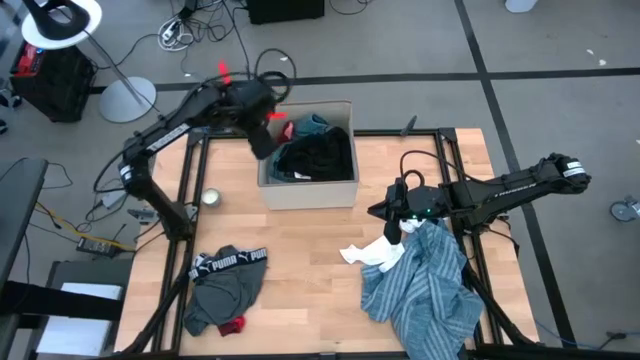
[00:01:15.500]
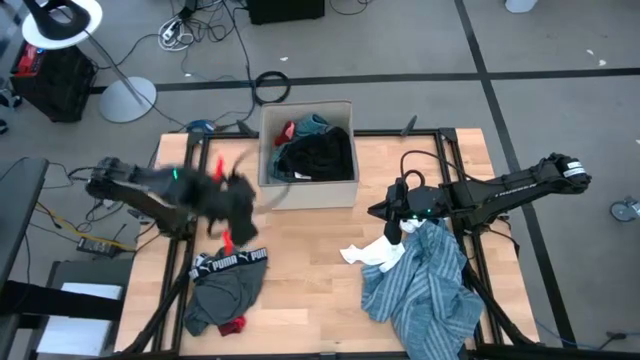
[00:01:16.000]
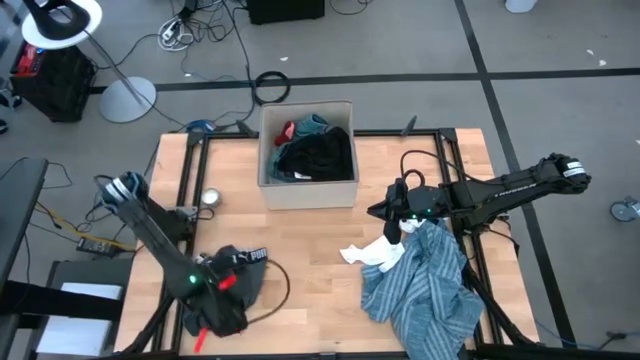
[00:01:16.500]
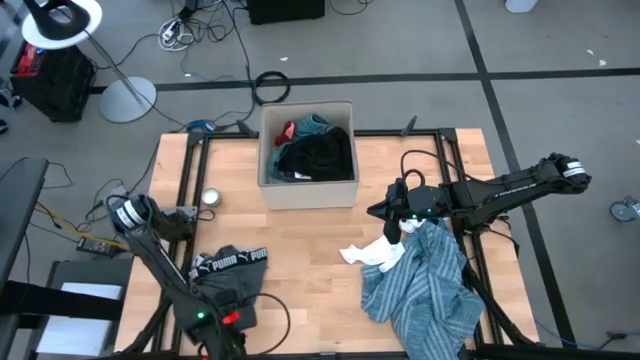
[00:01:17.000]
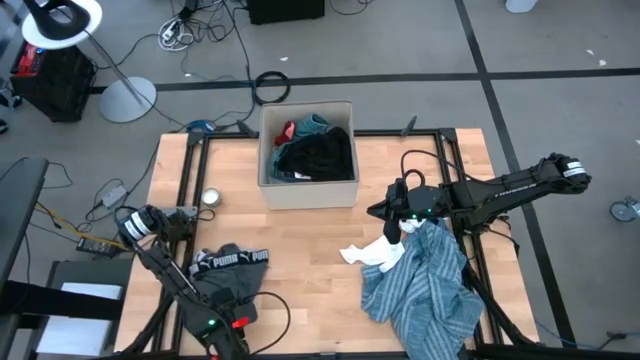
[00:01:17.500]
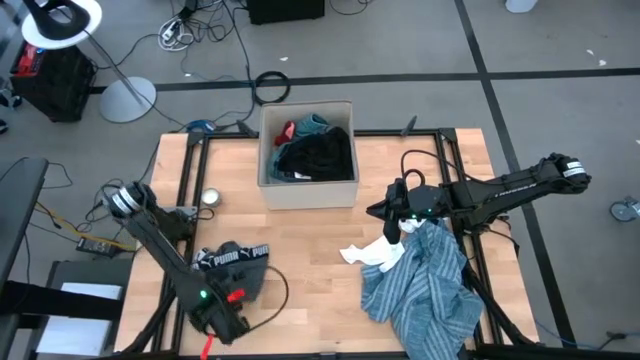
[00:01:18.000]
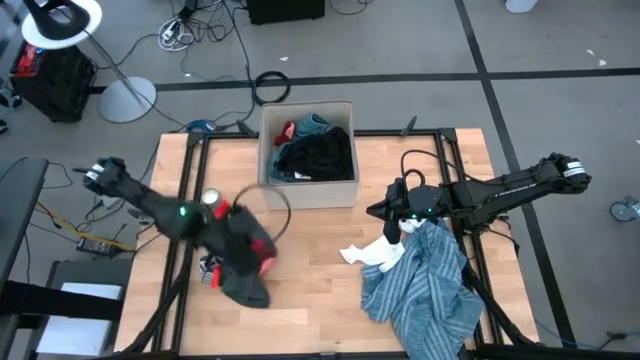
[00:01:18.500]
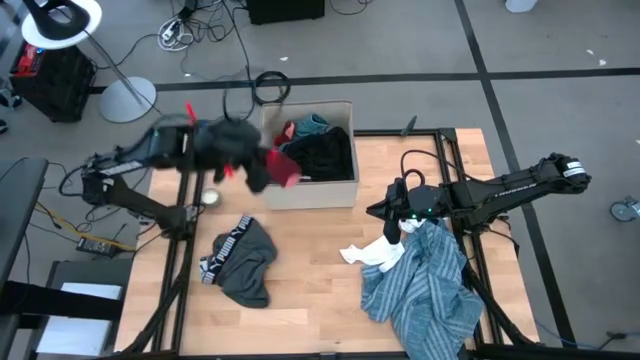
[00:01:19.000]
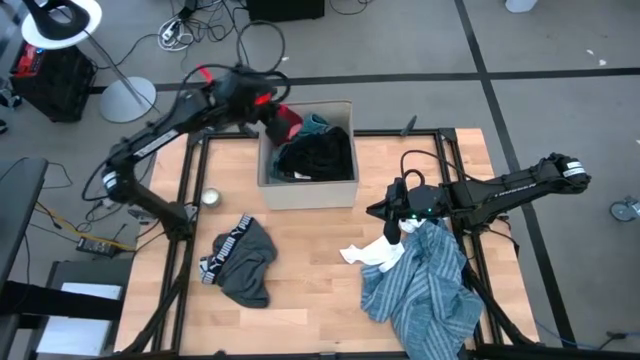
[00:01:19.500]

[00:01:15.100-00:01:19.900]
Task: Sort clothes
Put the red sock into the laundry organizer

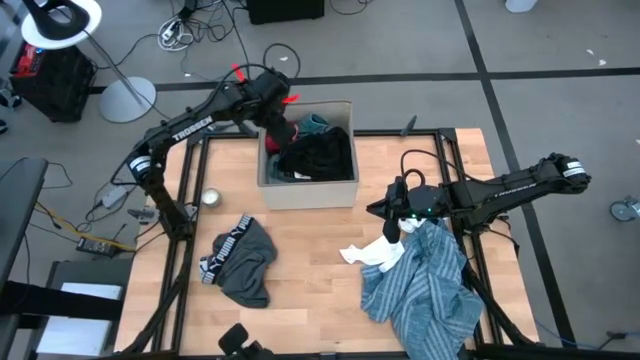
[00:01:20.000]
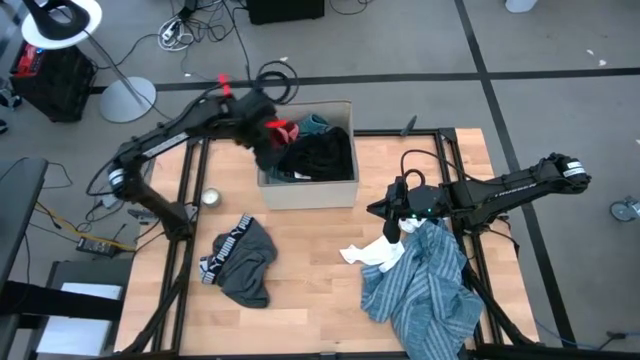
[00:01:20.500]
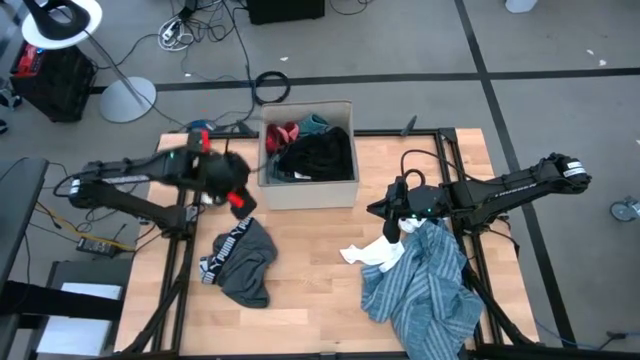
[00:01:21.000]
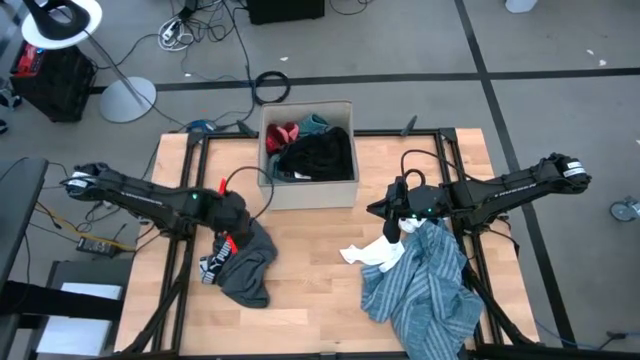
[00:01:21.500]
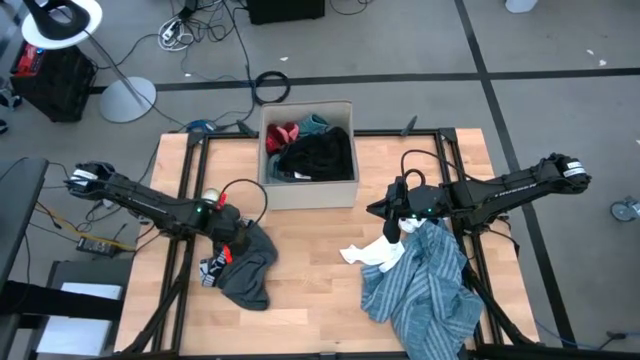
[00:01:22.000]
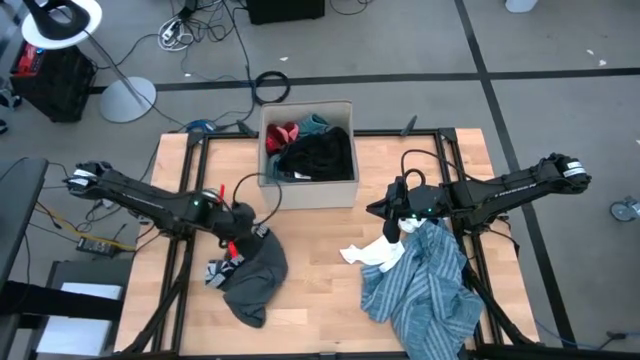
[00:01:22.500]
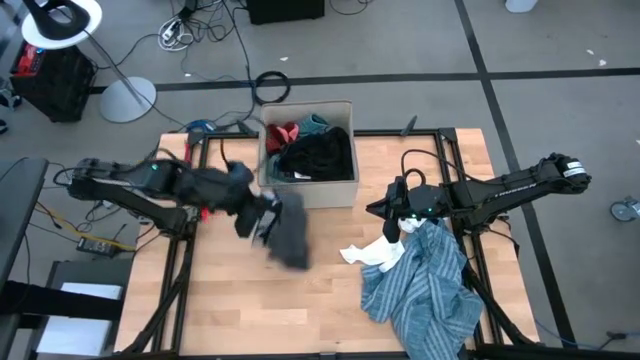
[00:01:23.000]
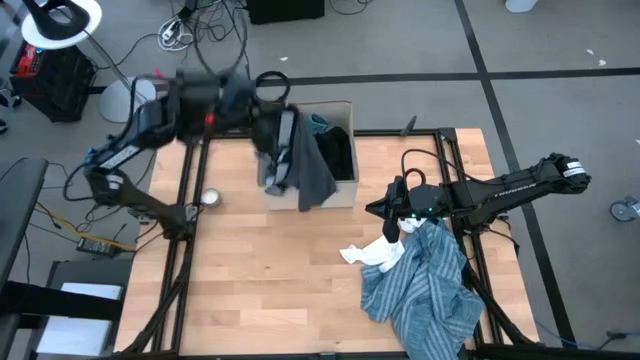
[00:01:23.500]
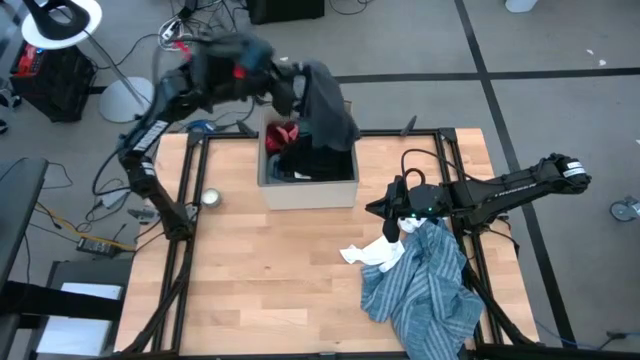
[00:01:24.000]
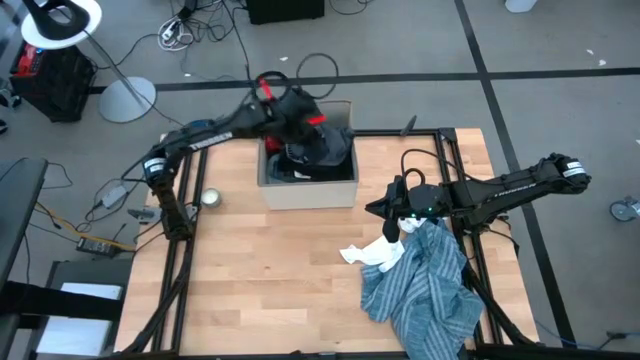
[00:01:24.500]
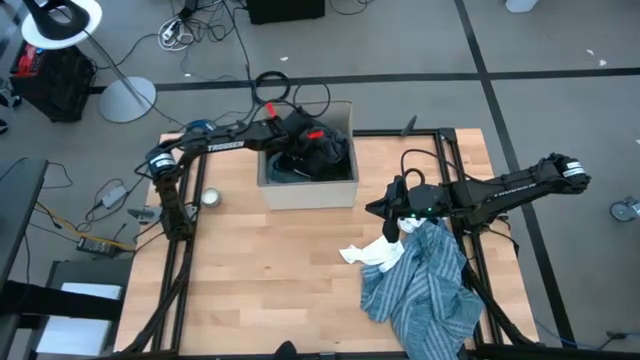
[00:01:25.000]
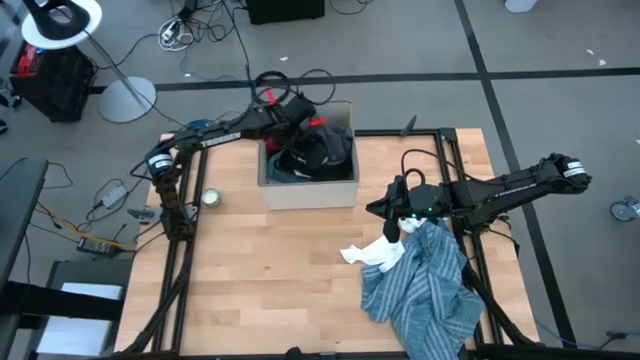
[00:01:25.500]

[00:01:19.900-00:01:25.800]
Put the gray underwear into the laundry organizer

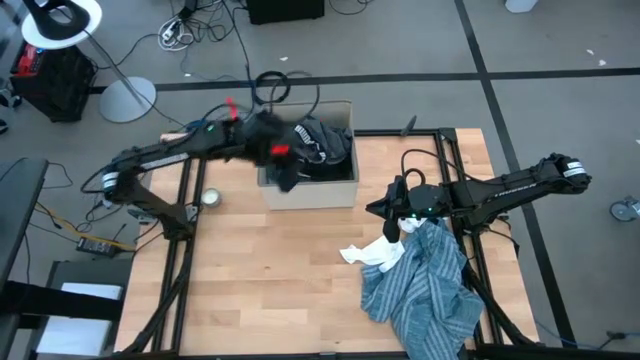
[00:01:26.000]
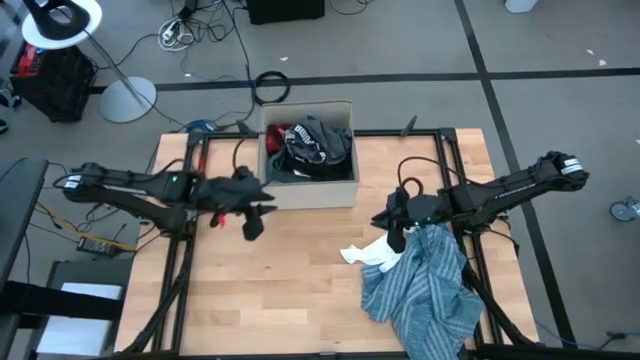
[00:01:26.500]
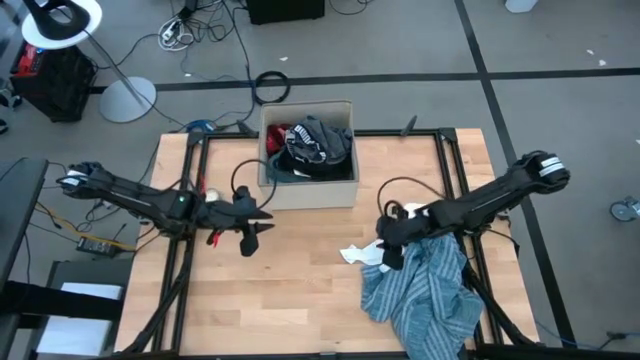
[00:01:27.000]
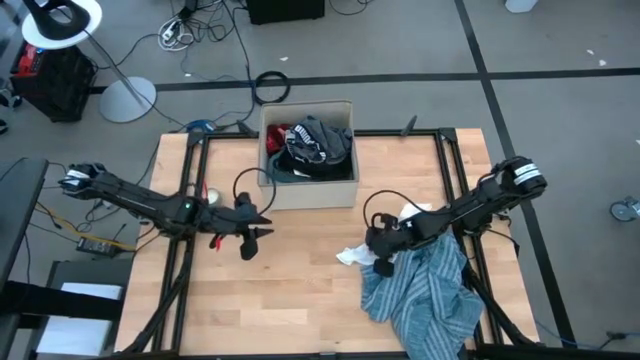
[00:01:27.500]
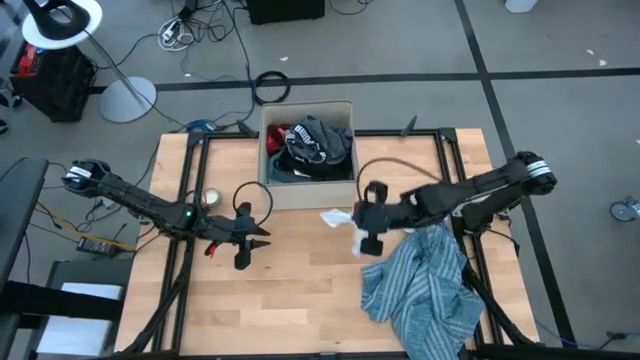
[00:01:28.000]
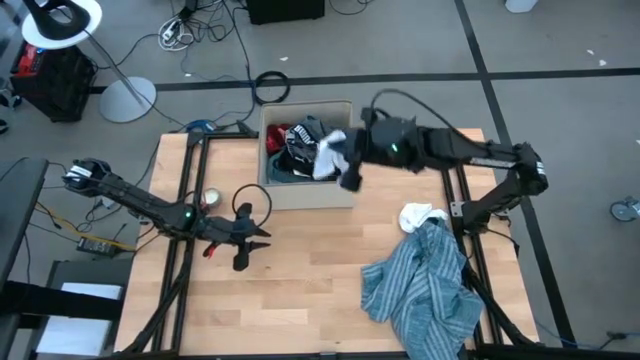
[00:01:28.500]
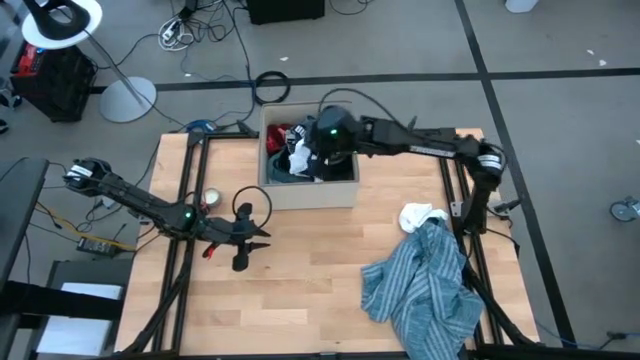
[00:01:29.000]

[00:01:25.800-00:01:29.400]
Put the left white sock into the laundry organizer

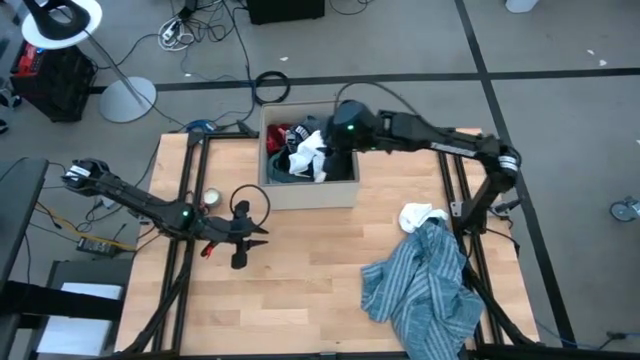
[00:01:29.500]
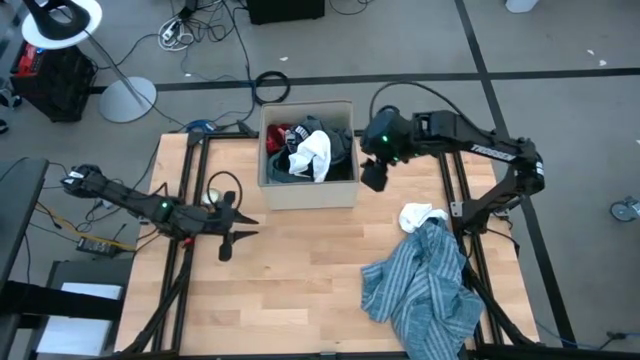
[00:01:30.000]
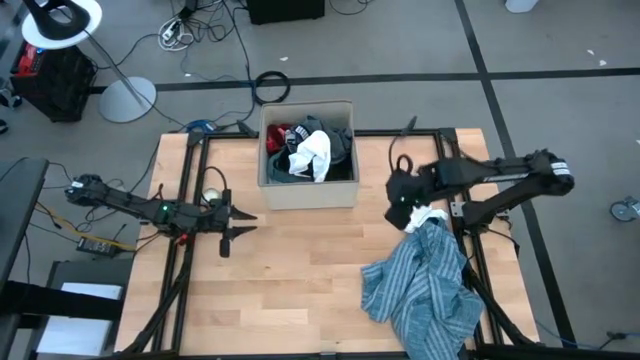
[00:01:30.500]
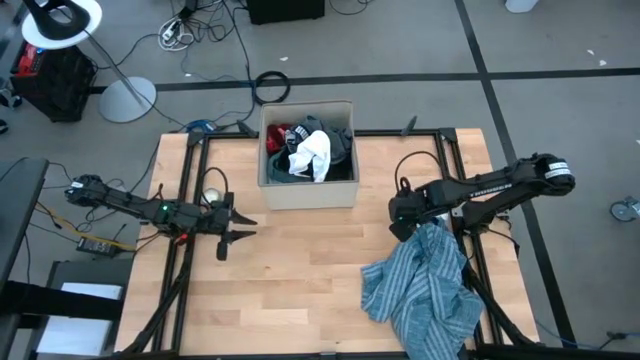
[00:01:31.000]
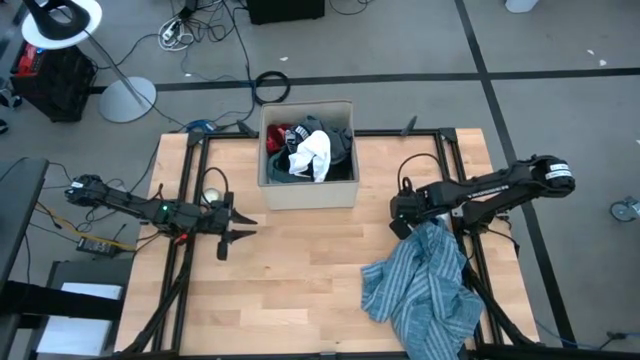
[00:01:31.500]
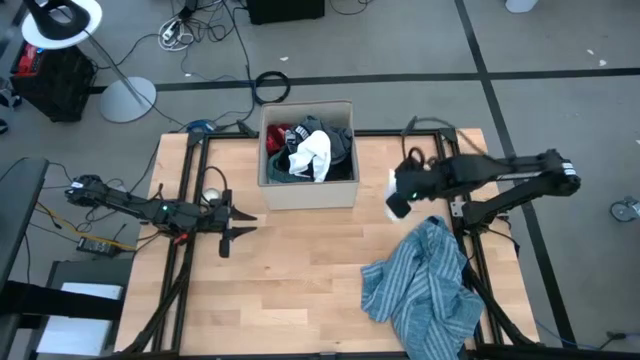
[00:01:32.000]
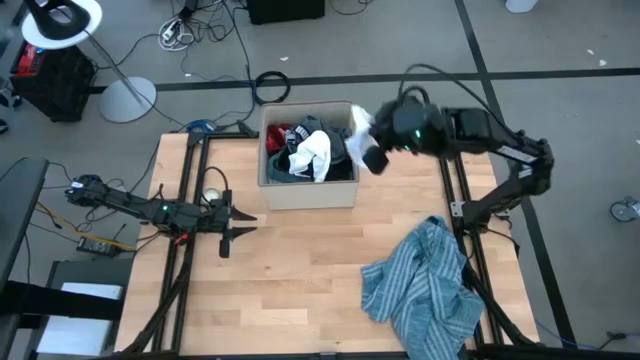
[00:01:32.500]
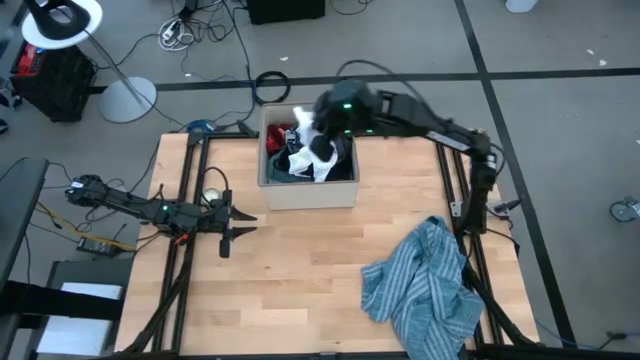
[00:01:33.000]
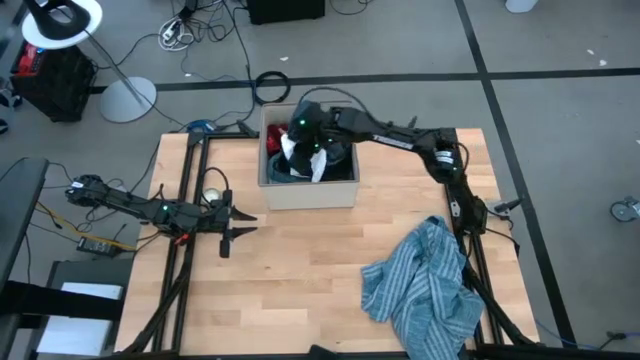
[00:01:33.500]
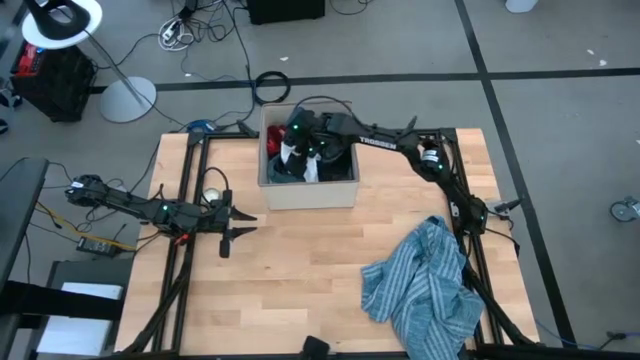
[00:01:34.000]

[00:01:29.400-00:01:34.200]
Put the white sock into the laundry organizer

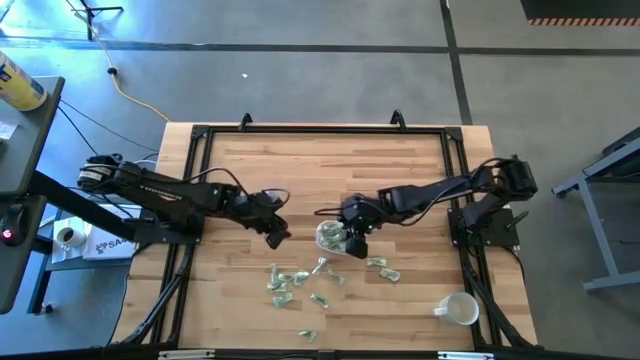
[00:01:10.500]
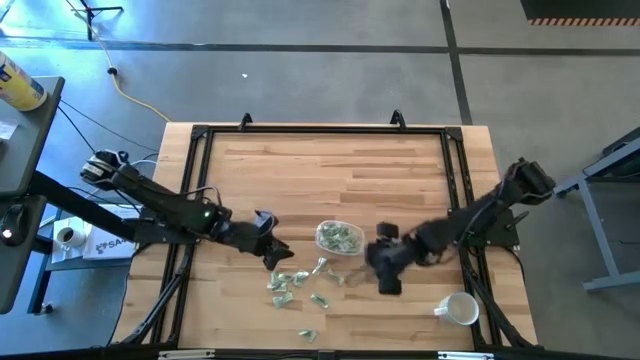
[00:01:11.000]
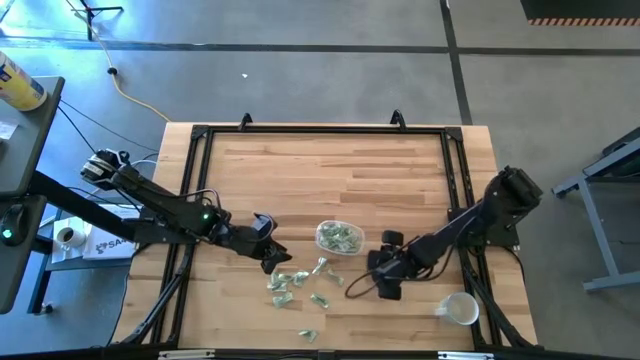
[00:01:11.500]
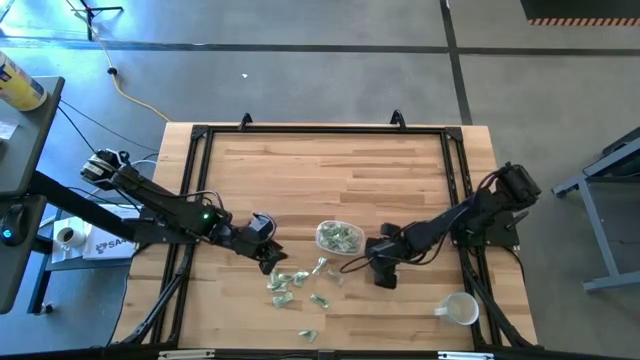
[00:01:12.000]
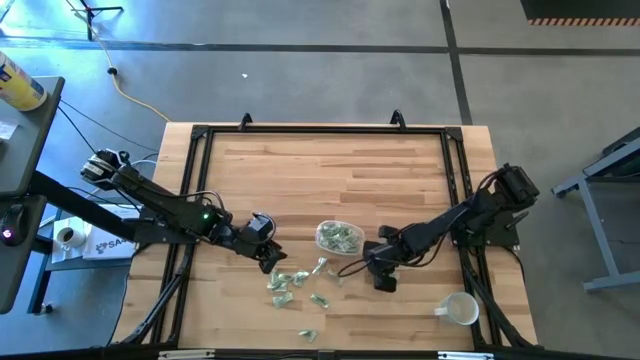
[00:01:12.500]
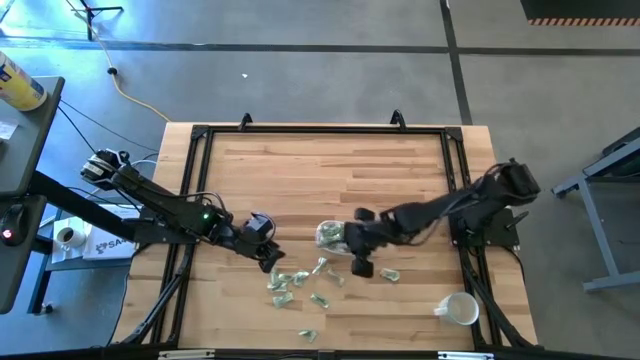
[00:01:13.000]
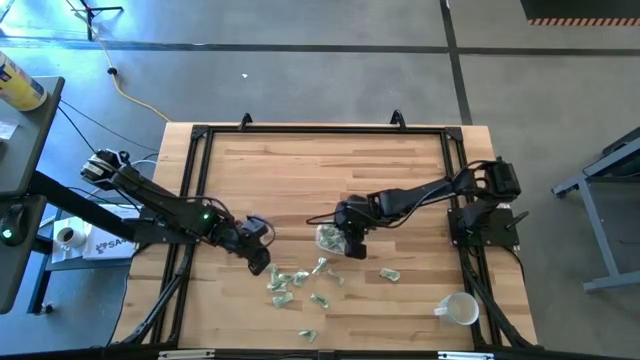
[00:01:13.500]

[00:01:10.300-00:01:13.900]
Task: Pick and place Stevia / Truvia into bins
Put the green stevia packet into the transparent container
